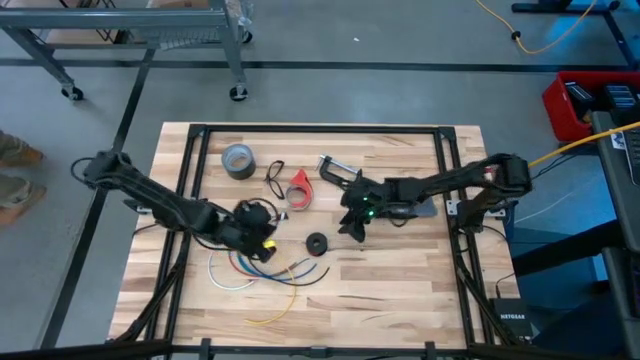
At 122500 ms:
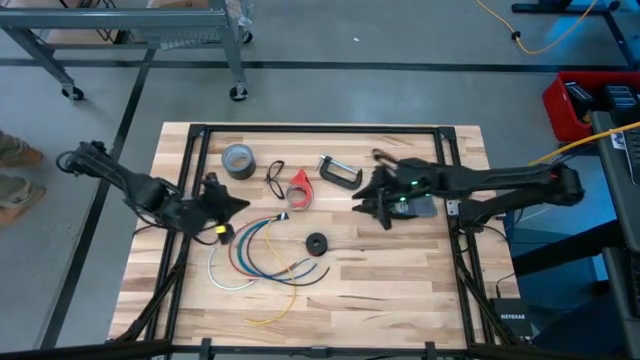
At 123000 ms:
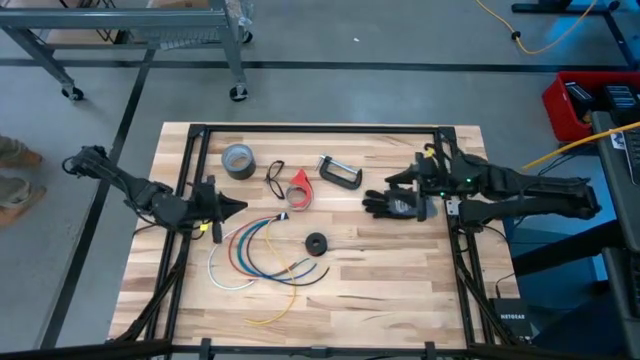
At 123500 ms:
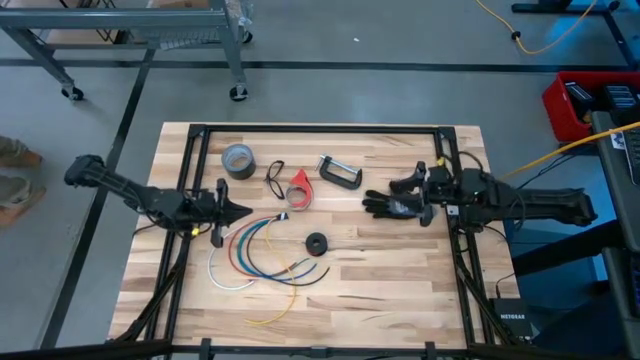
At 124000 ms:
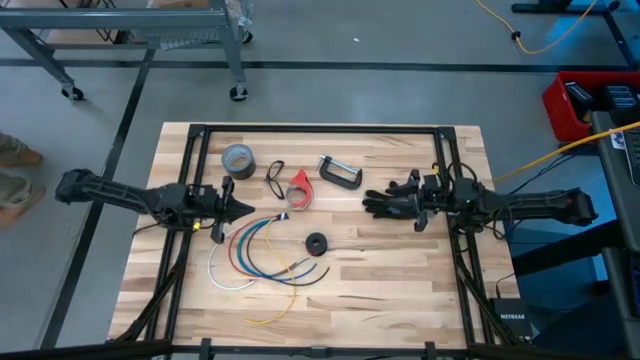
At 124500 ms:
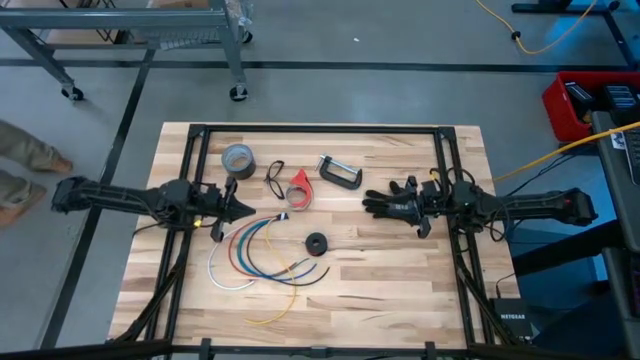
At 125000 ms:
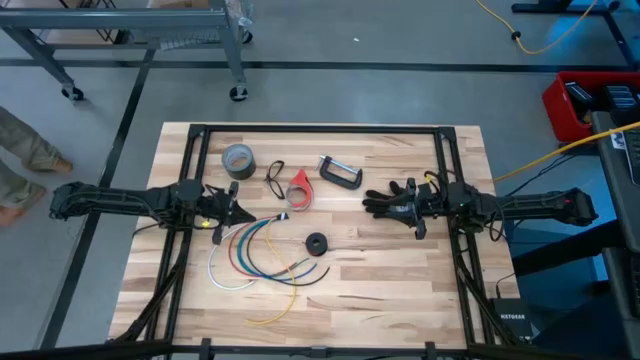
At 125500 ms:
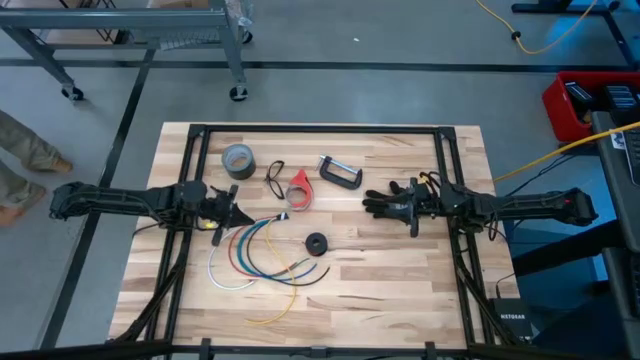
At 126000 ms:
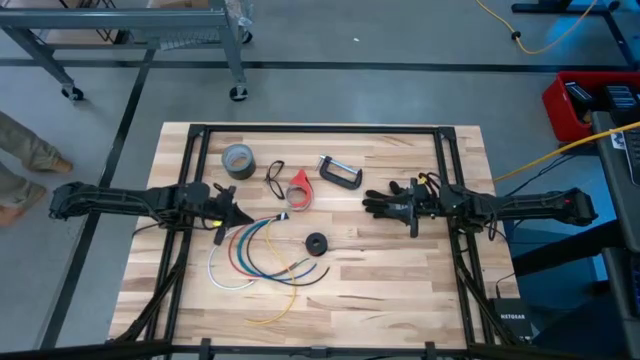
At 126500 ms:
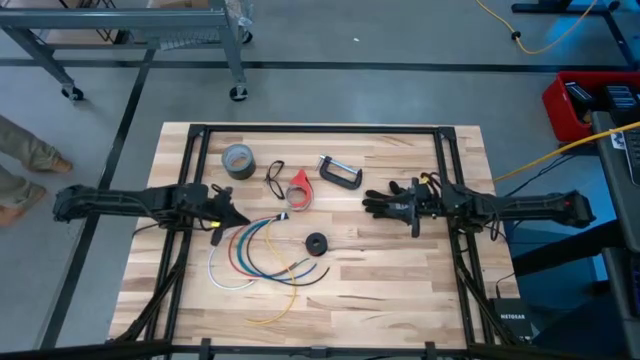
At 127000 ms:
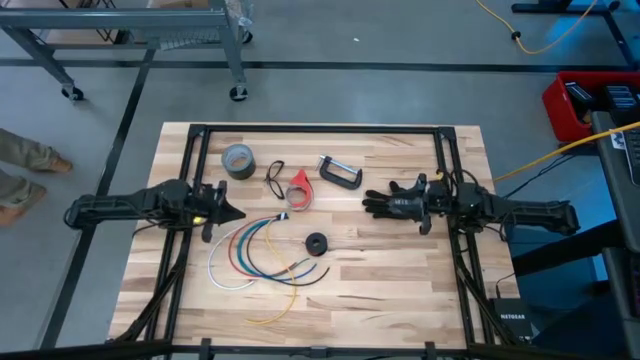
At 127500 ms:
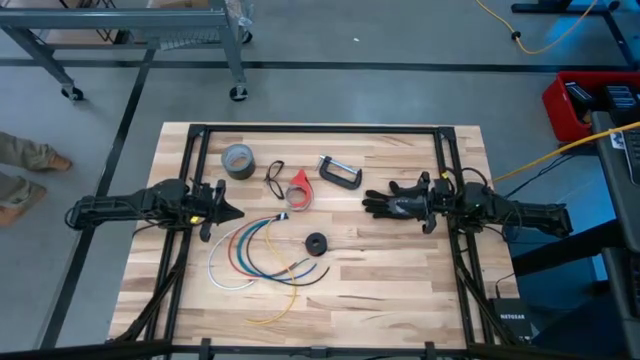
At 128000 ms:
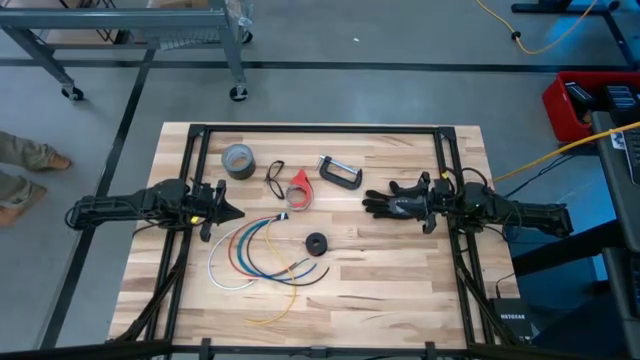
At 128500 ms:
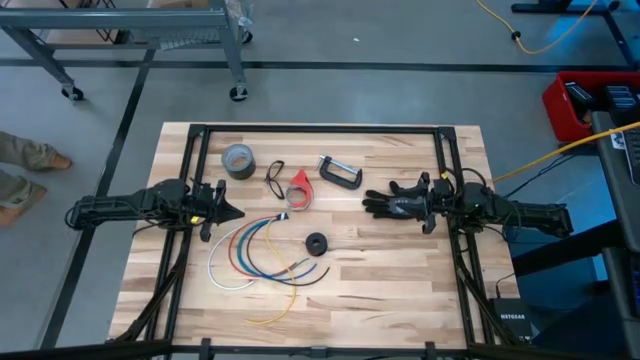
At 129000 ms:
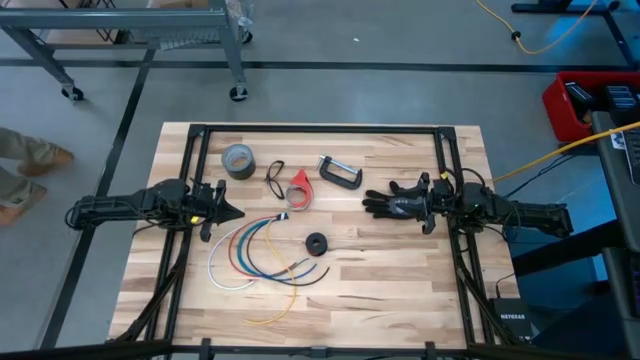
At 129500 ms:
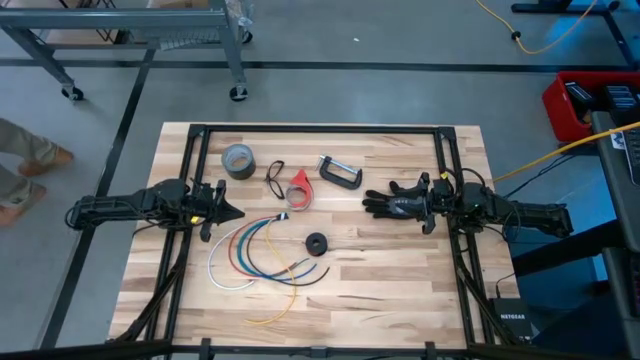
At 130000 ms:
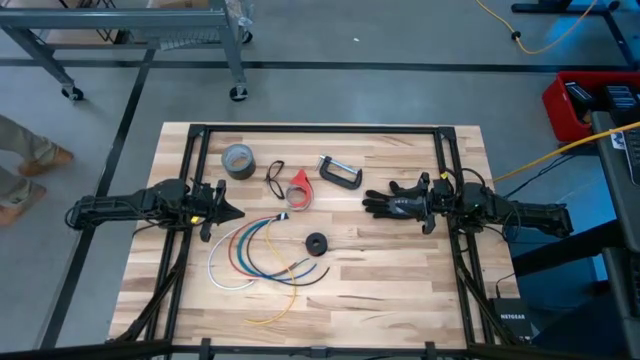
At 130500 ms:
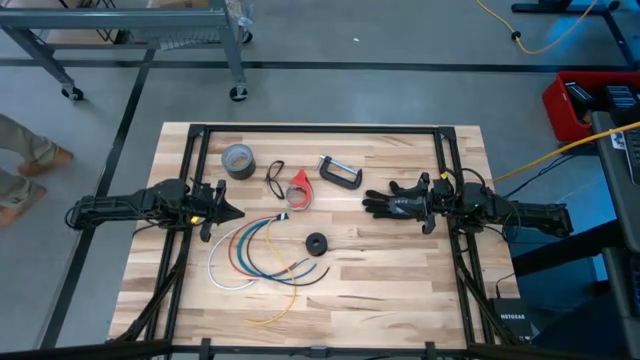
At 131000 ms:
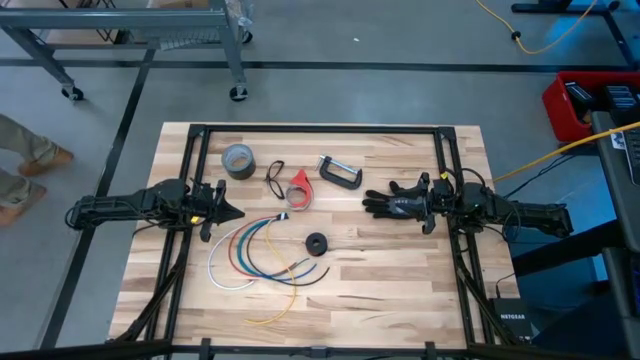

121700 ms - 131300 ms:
Task: Coil cords
Return to Home Position

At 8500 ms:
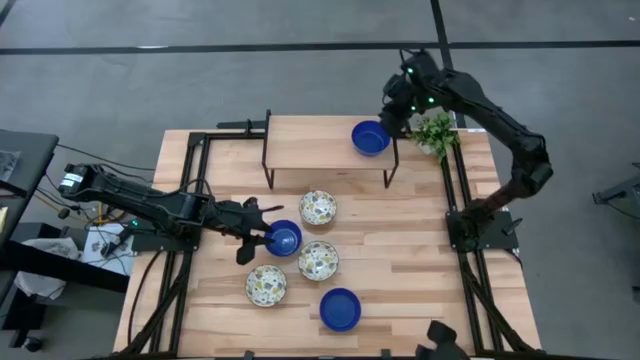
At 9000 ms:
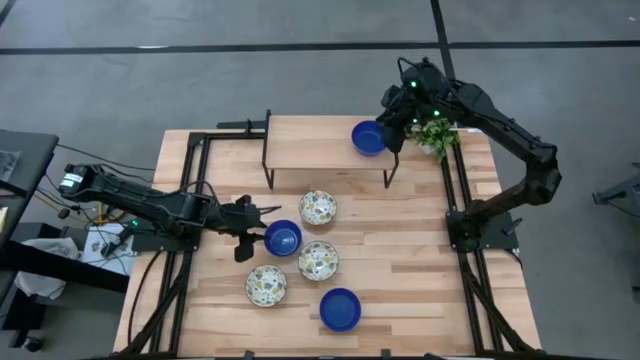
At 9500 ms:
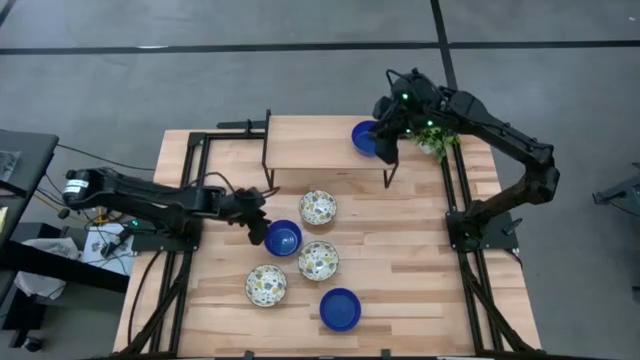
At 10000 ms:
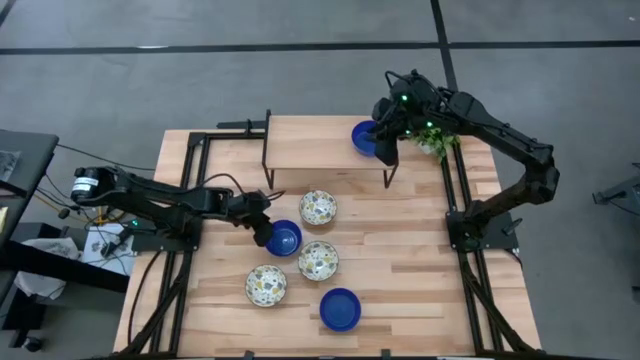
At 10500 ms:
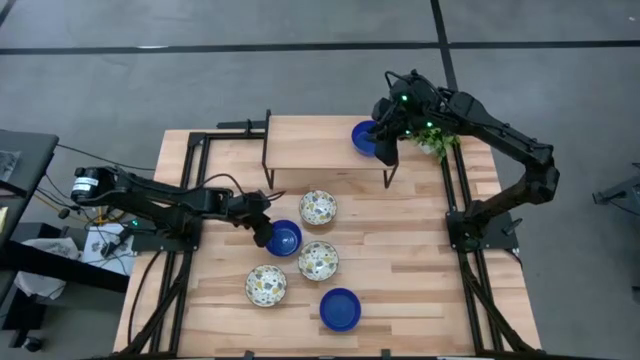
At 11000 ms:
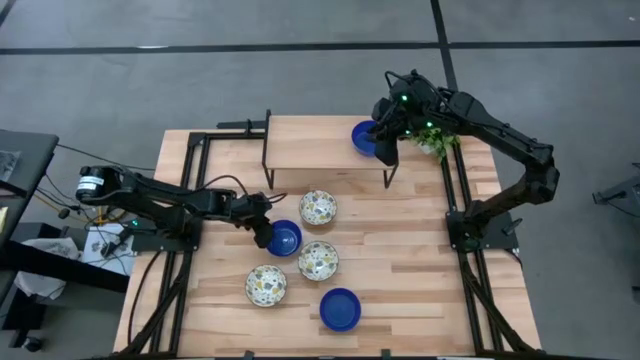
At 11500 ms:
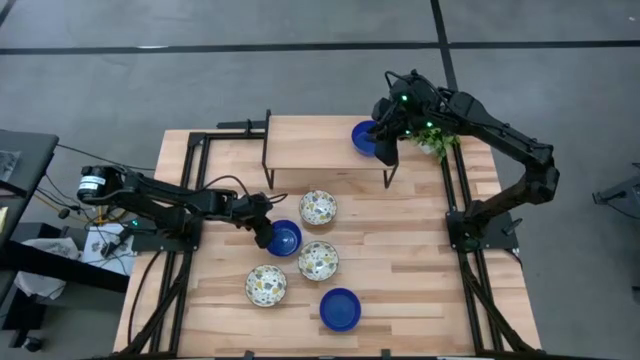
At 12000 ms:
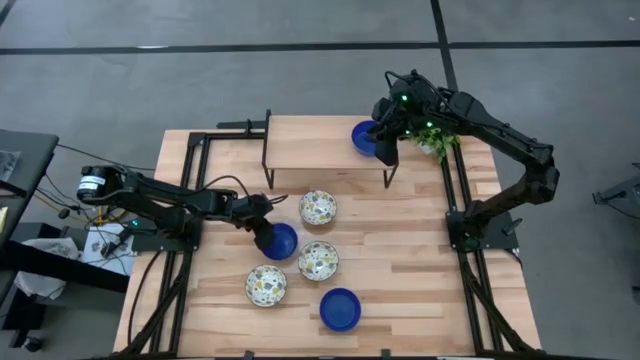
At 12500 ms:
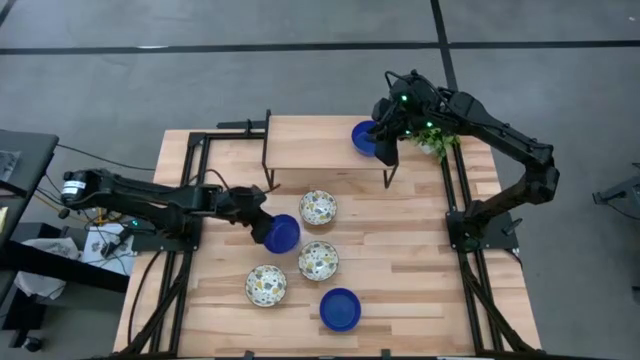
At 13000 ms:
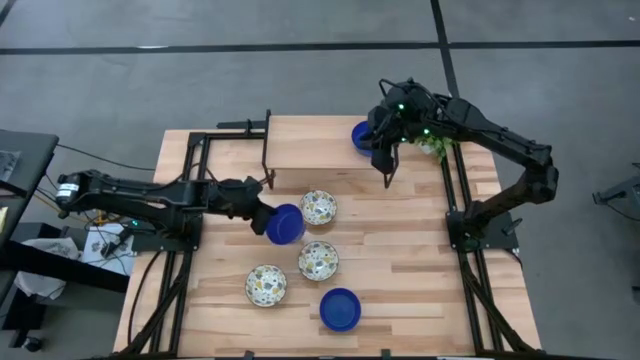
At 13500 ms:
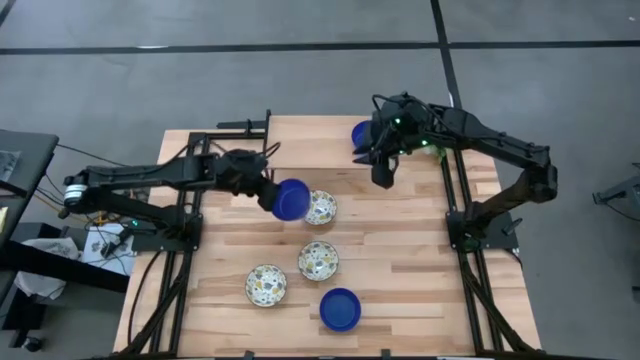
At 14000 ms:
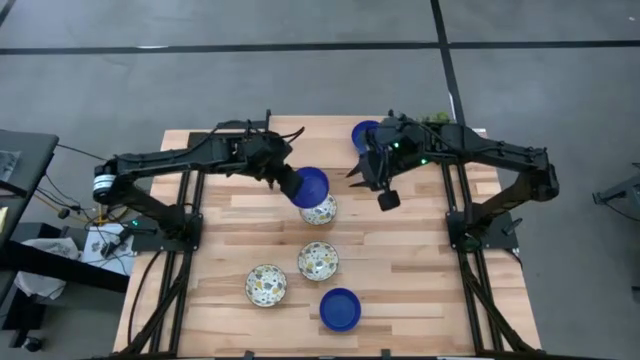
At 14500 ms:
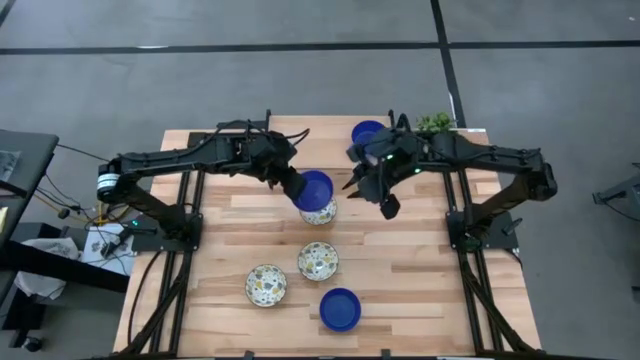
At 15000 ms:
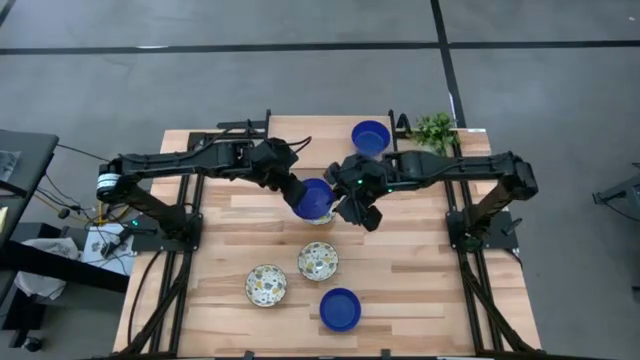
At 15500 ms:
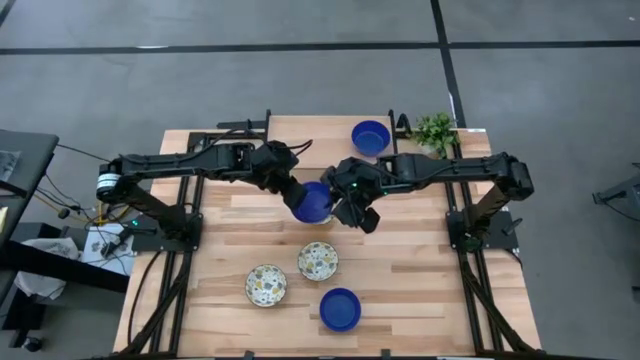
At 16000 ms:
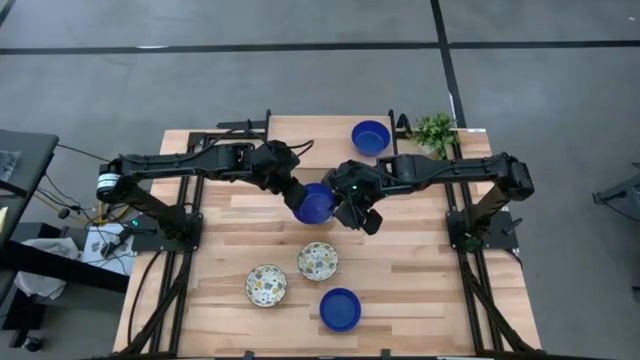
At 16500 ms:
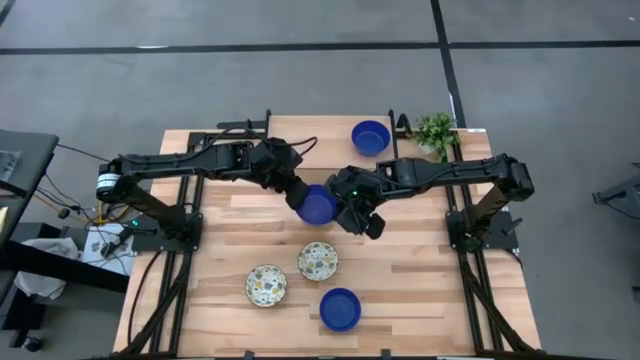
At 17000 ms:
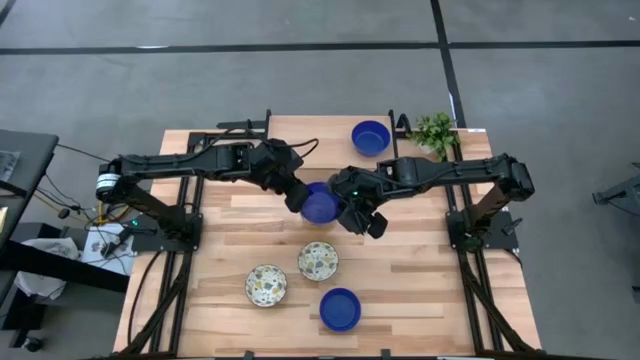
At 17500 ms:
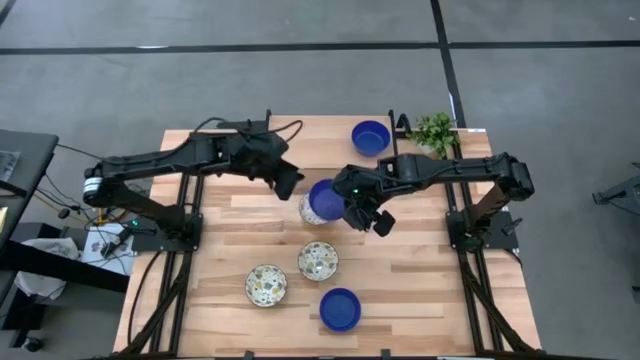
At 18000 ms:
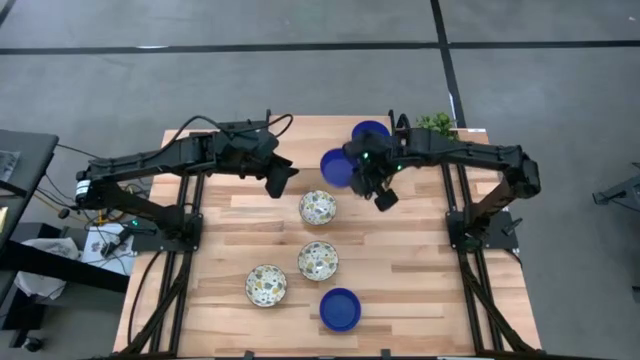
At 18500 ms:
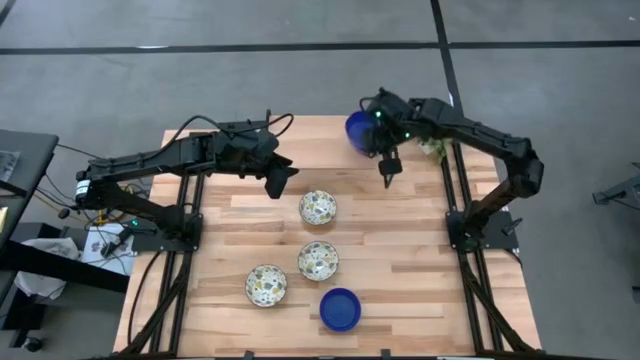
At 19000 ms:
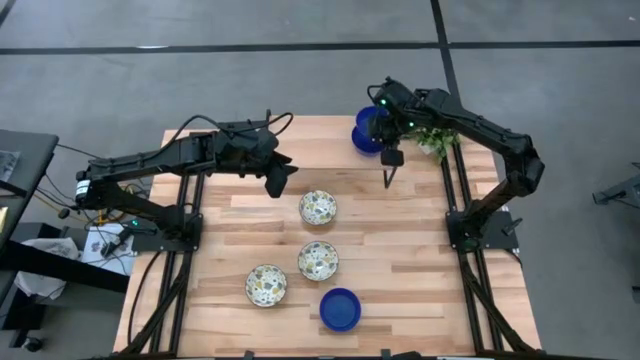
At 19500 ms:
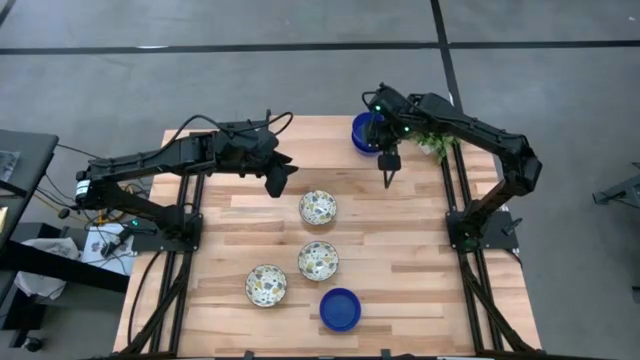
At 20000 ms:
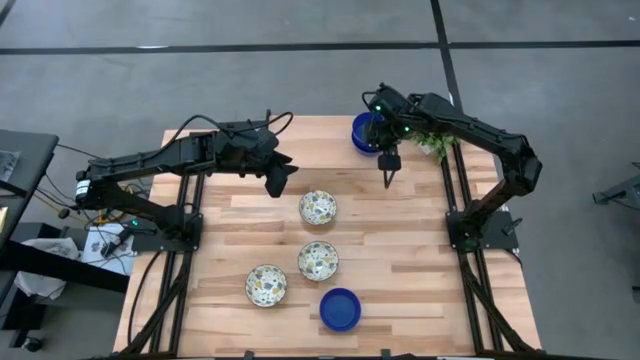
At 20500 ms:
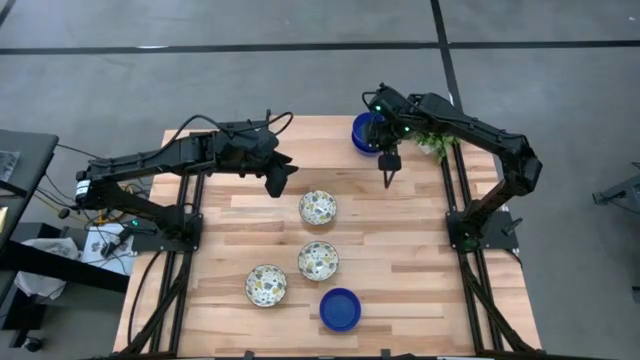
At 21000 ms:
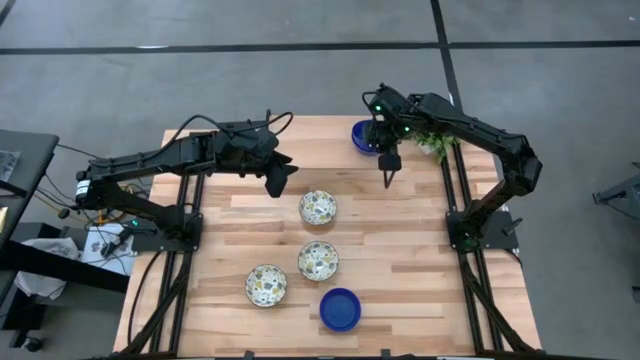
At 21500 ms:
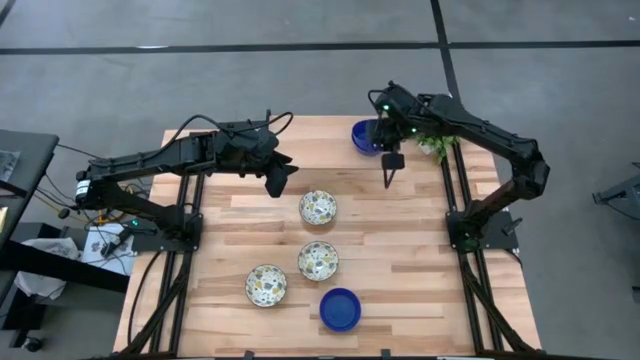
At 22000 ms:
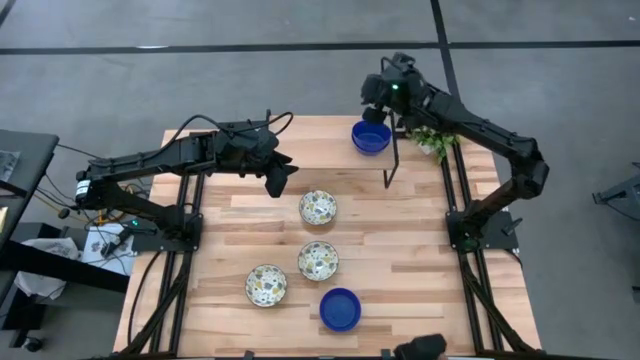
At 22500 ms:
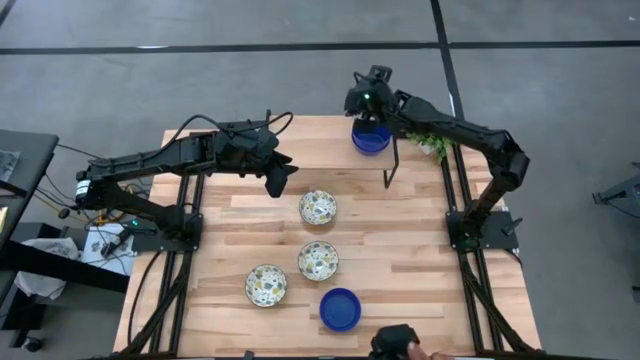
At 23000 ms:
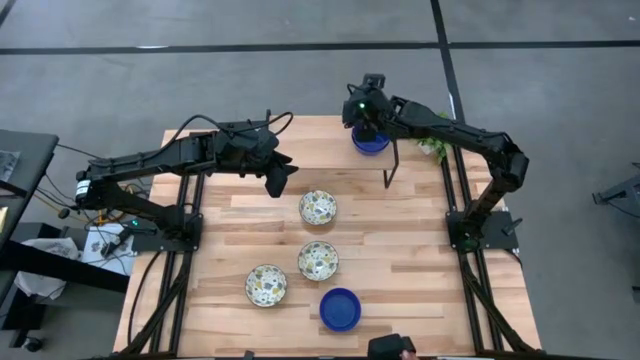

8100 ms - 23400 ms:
Task: Pick & Place Mini bowls
Stack the top blue bowl on the blue bowl on the shelf
